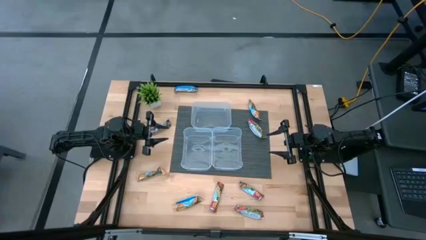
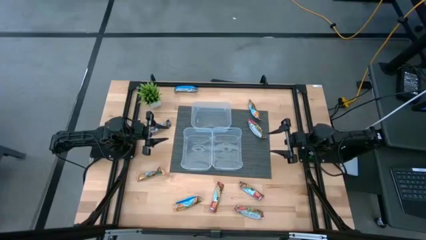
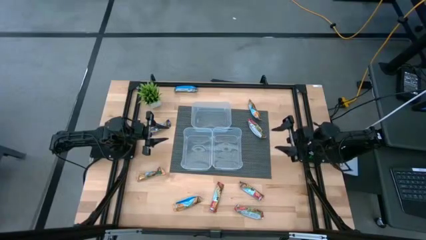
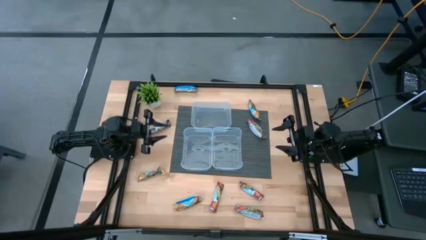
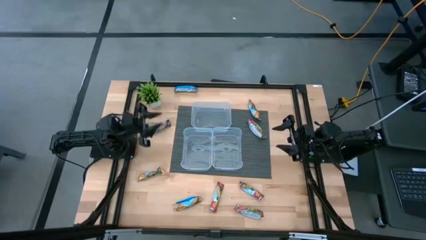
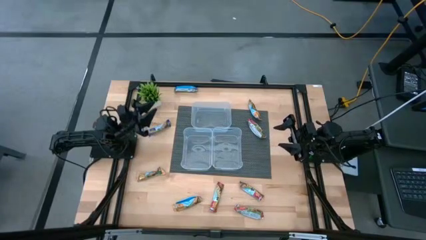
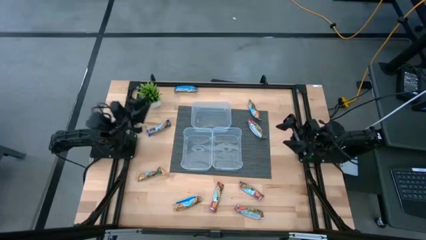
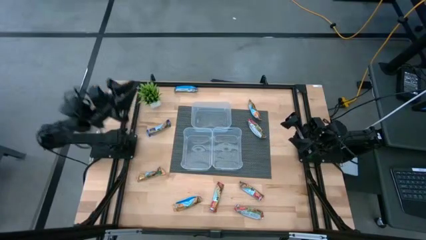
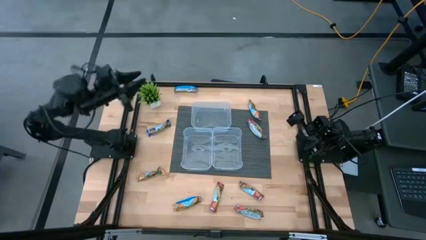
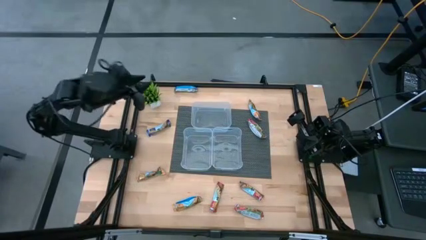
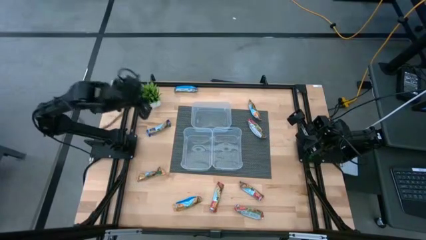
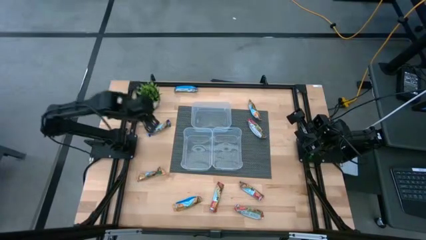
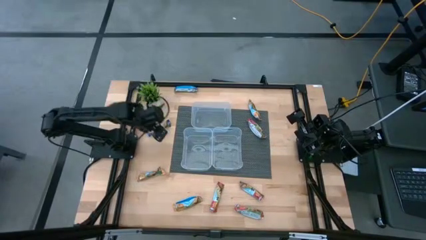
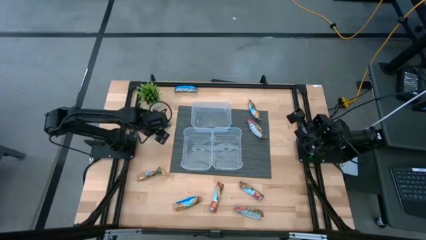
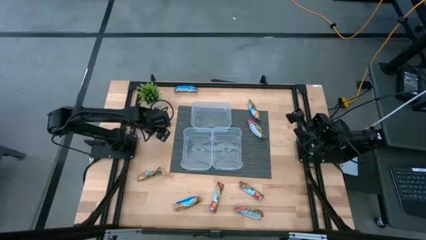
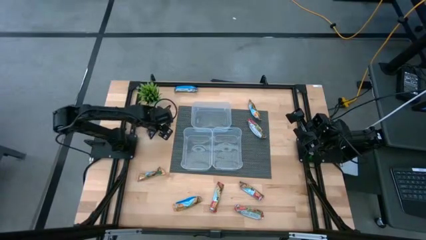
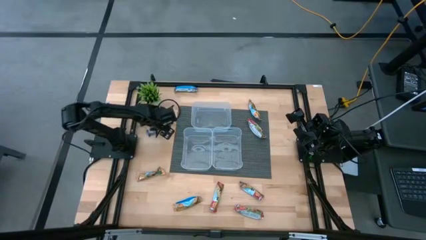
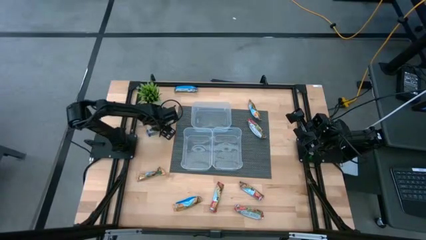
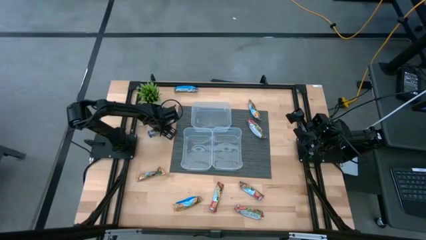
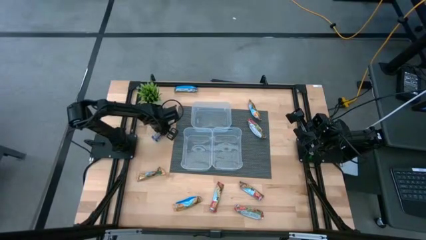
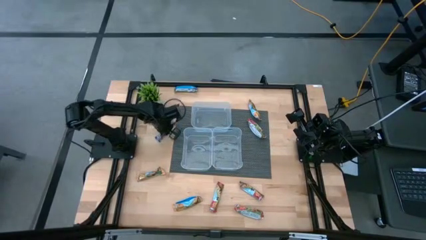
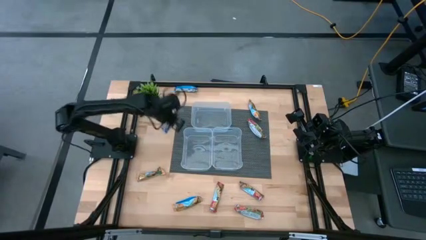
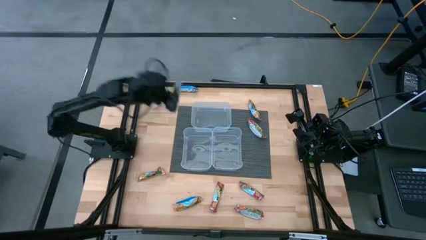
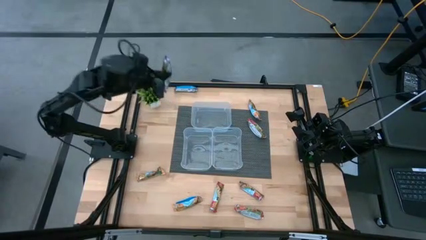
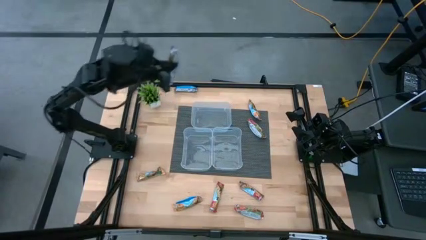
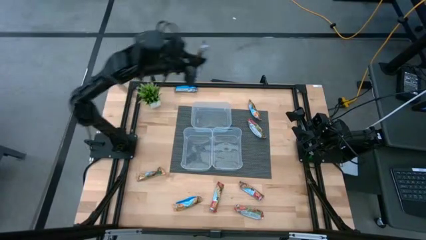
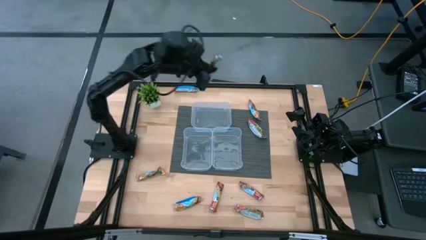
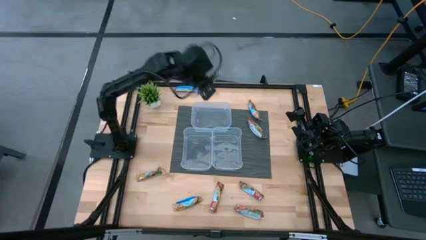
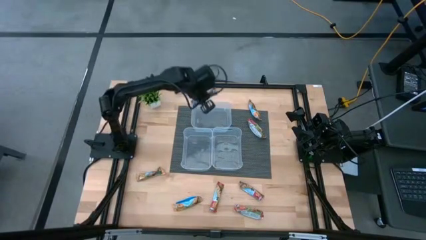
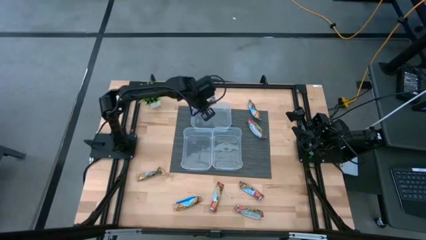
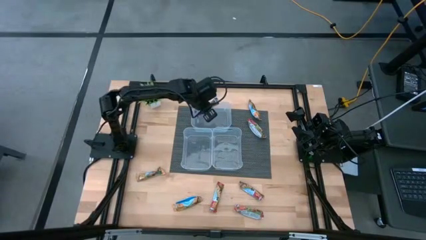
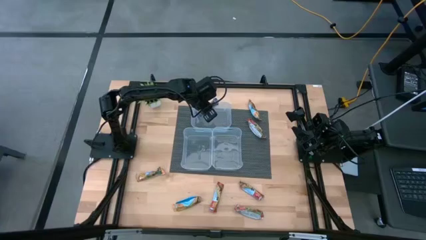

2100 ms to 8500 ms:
Task: Pick and place Granola Bars by type
Put the blue granola bar into the top transparent bin

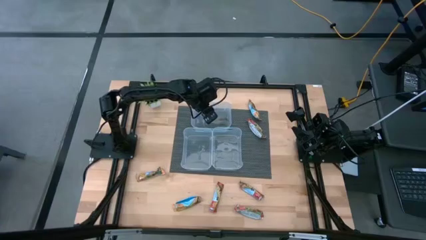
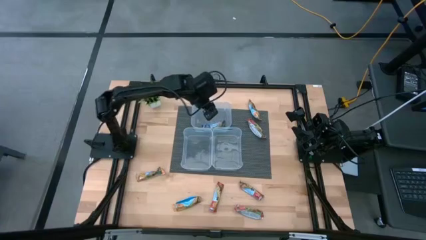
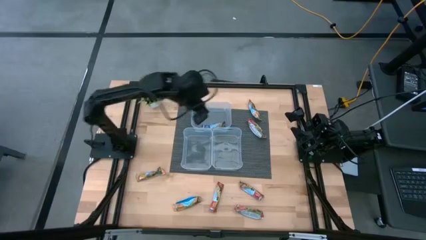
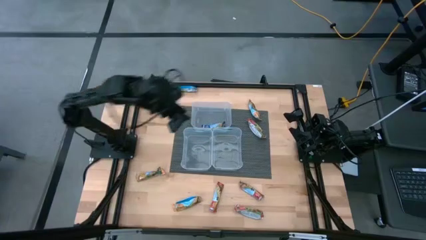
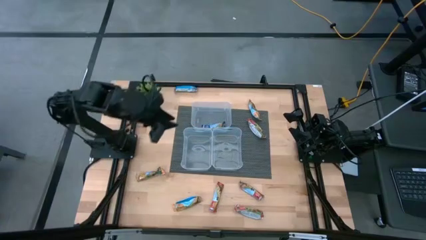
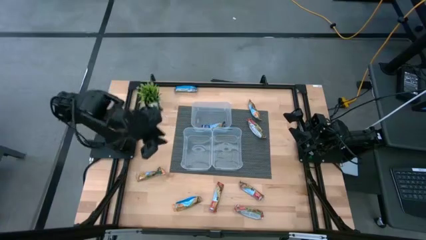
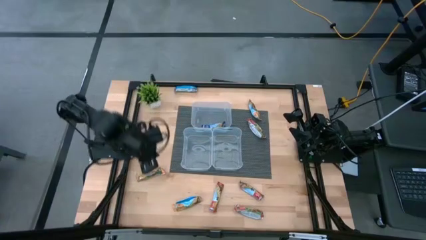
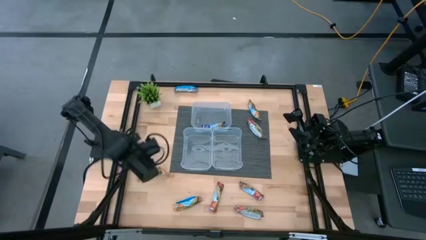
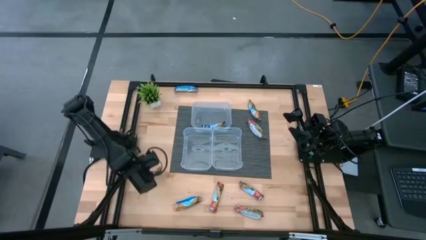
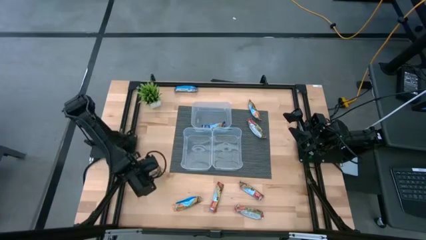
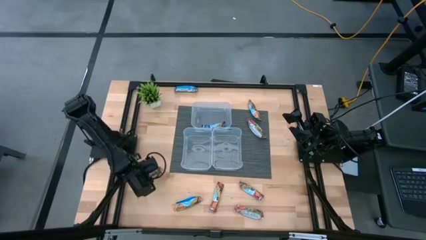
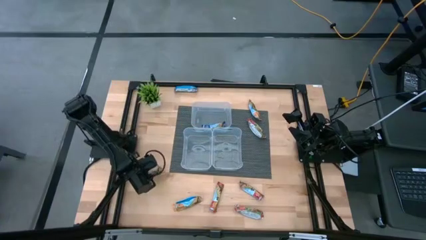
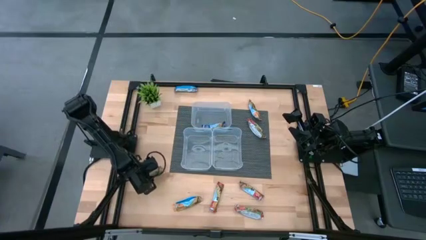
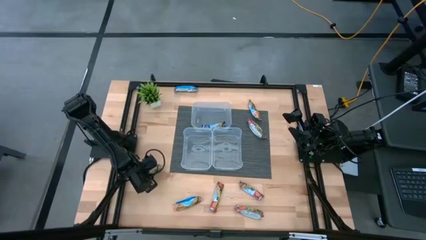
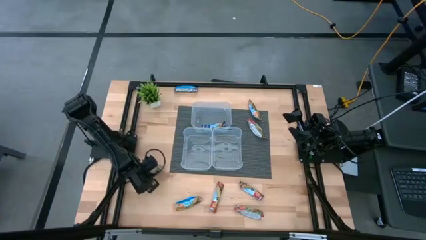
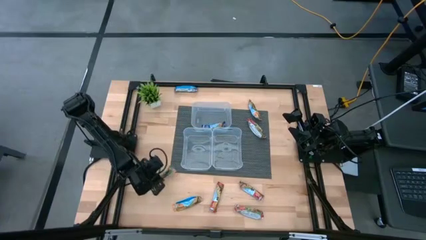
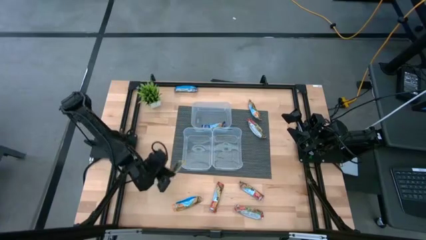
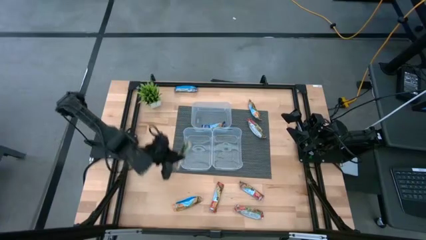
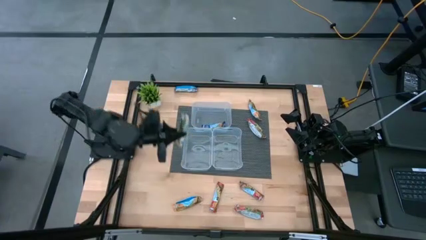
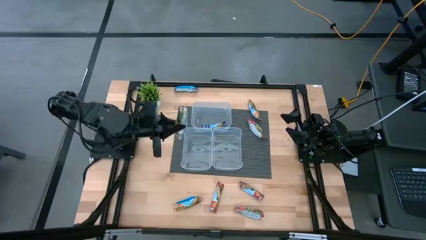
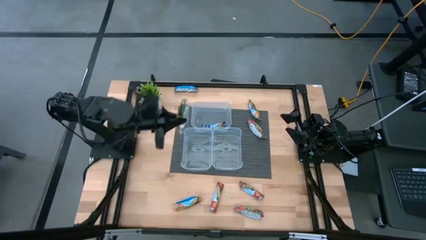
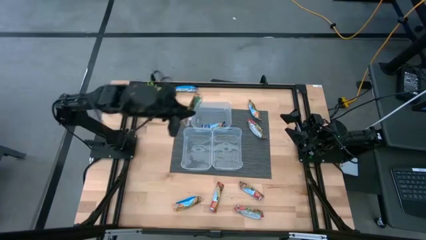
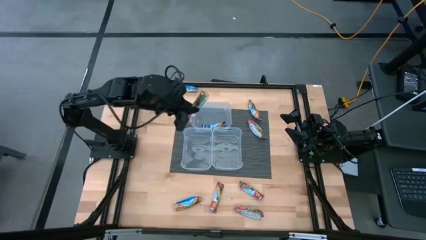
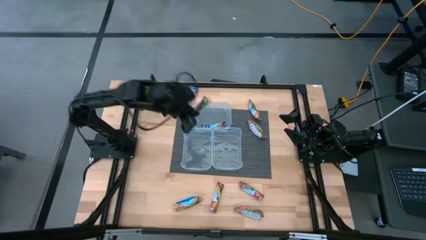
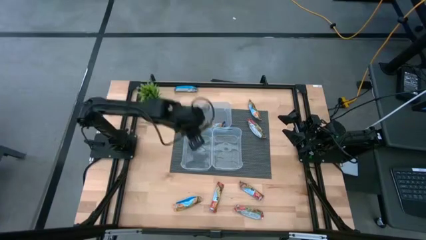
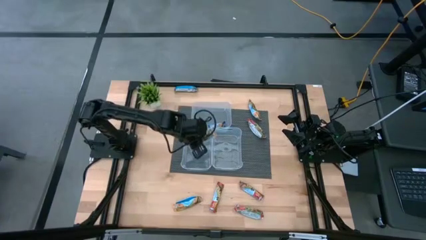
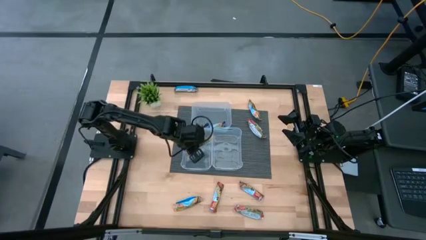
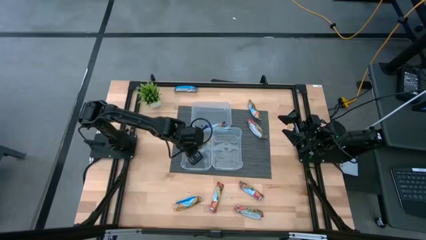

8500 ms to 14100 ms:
Put the yellow granola bar into the bottom left transparent bin

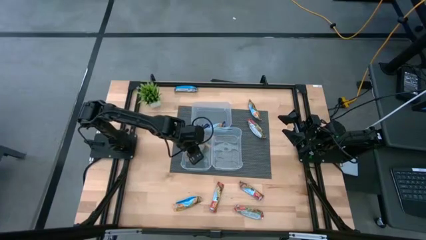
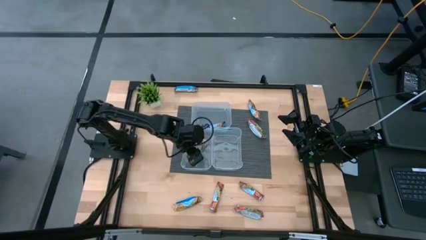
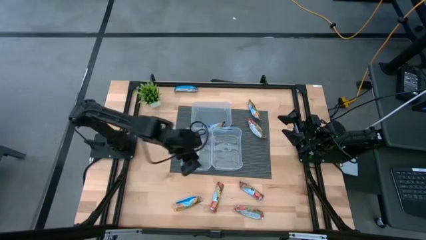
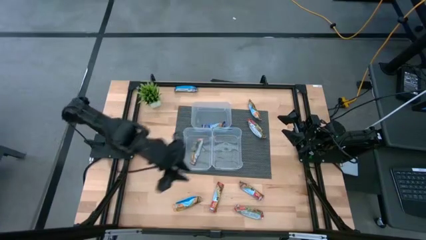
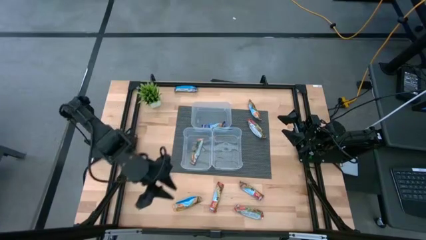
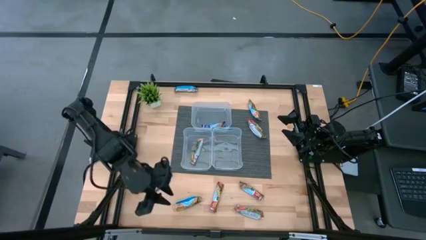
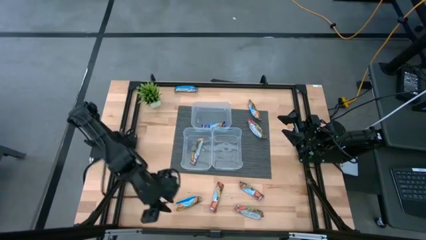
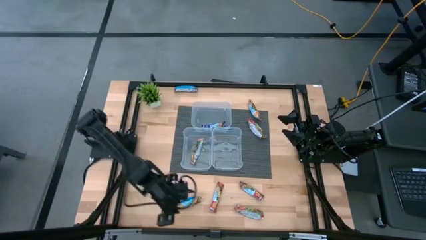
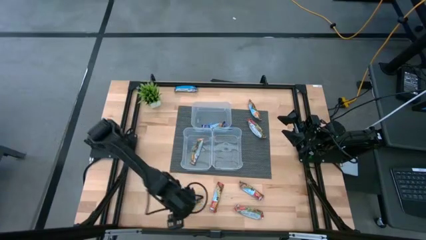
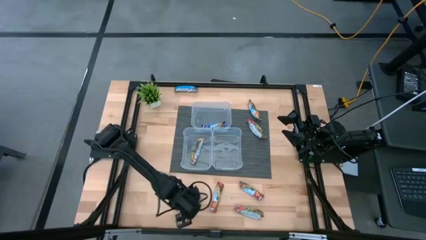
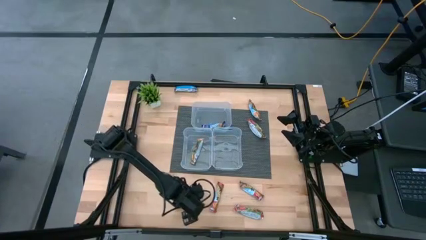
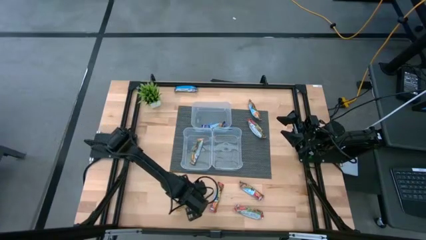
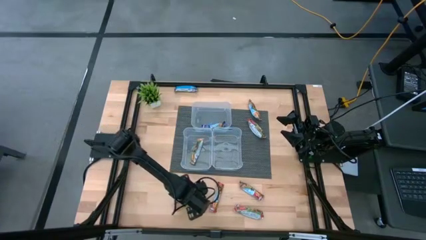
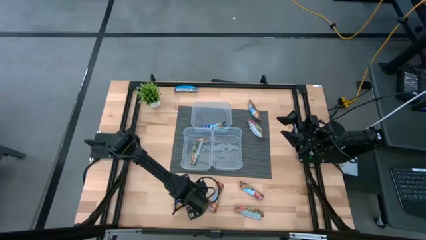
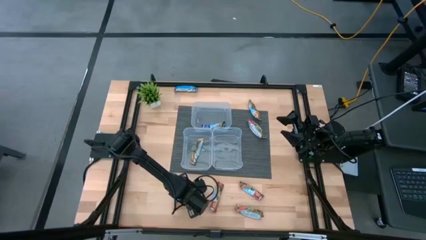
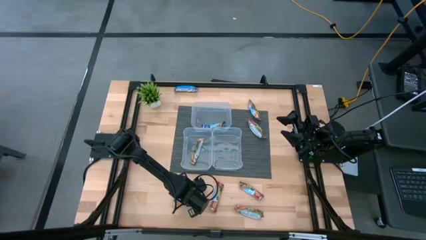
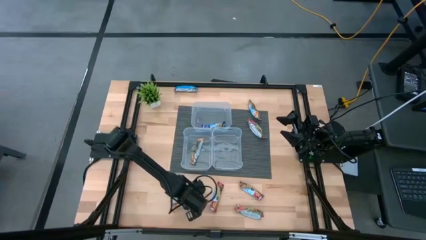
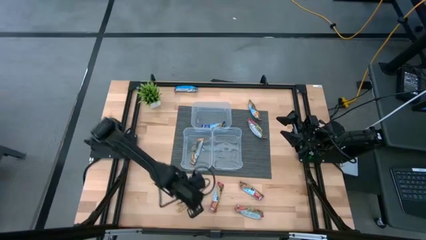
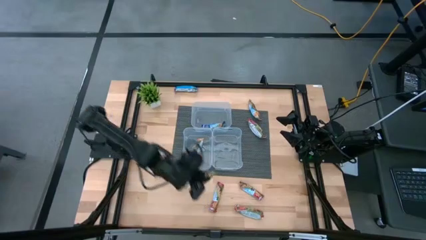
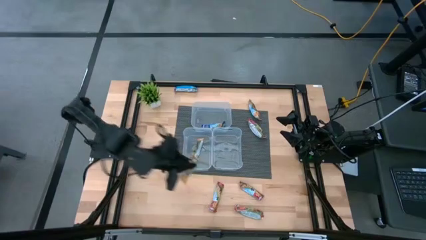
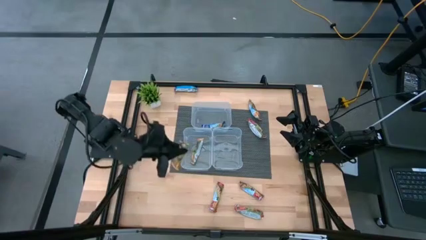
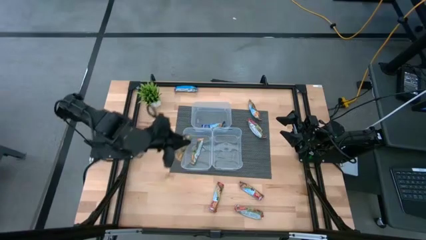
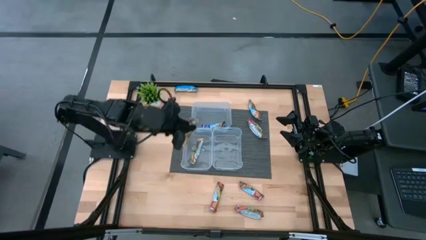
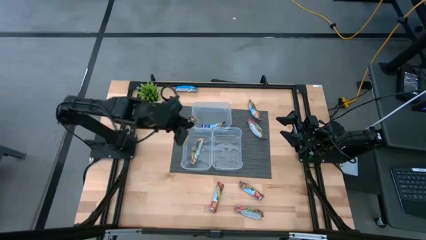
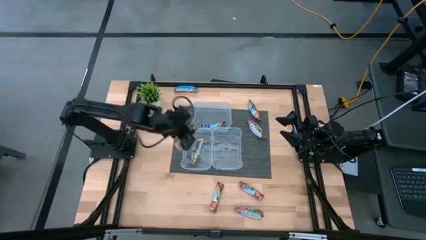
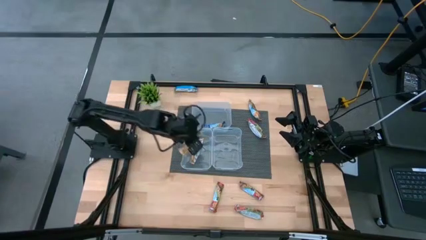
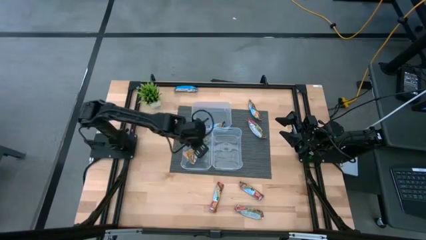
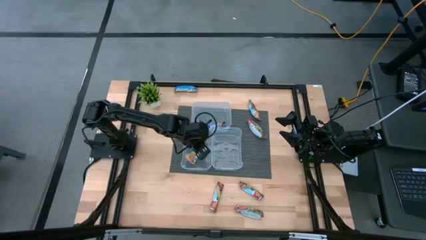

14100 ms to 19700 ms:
Put the yellow granola bar into the bottom left transparent bin
